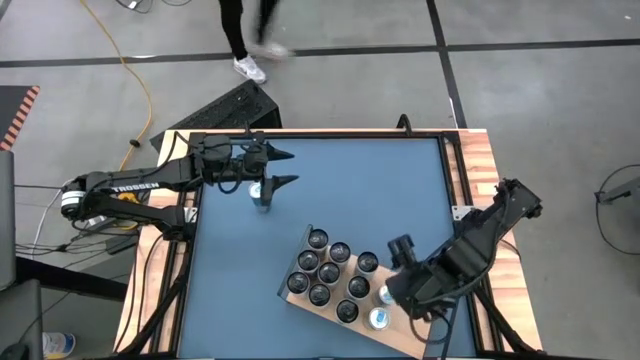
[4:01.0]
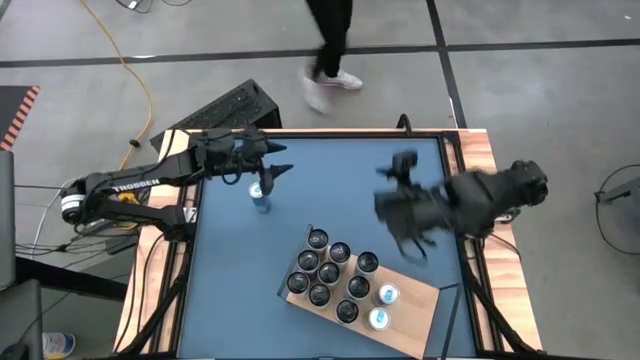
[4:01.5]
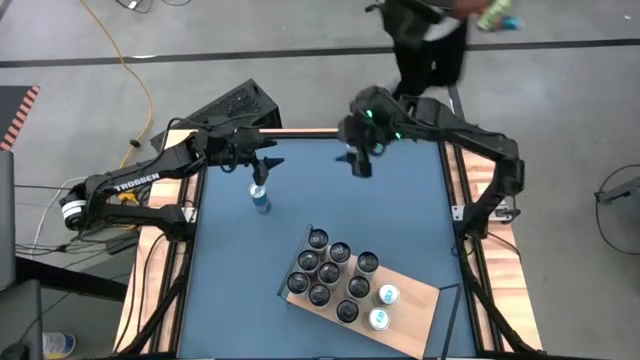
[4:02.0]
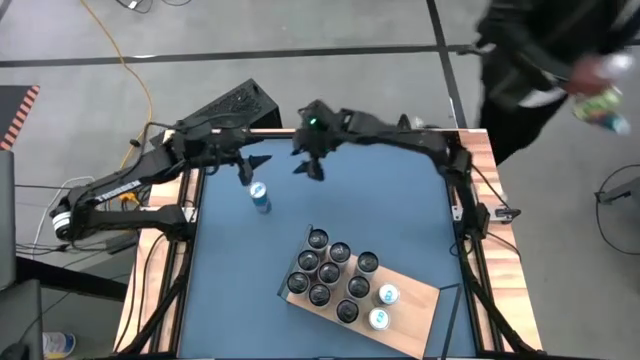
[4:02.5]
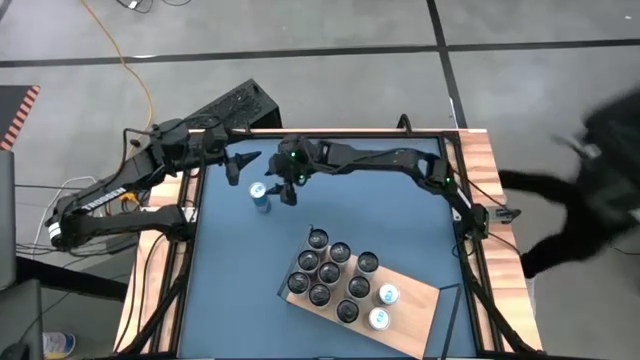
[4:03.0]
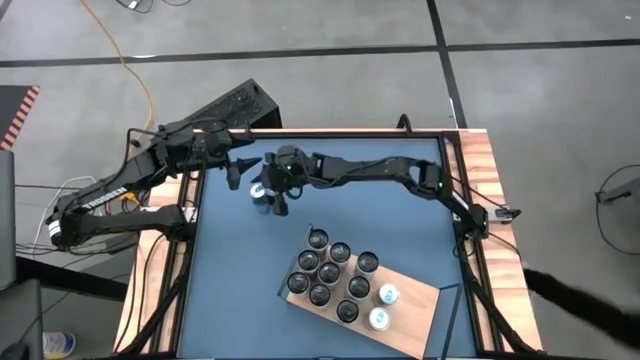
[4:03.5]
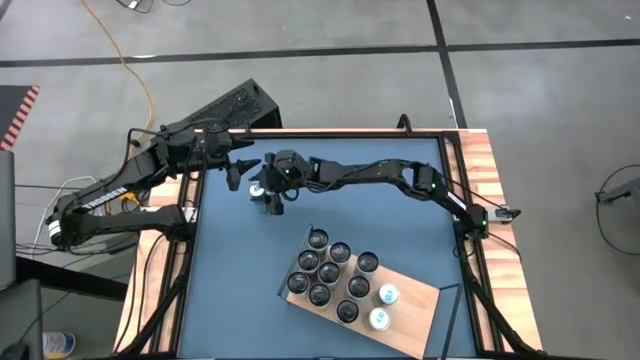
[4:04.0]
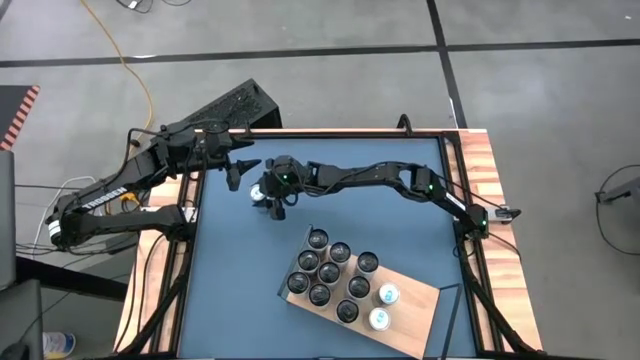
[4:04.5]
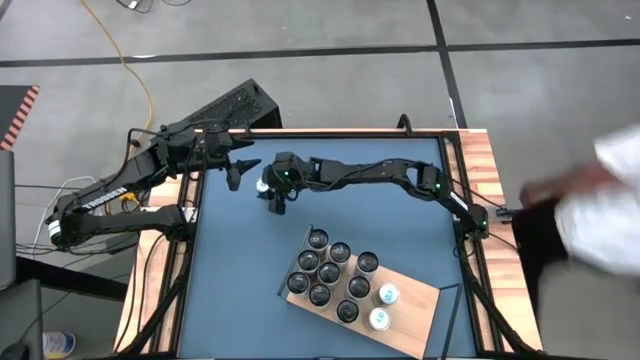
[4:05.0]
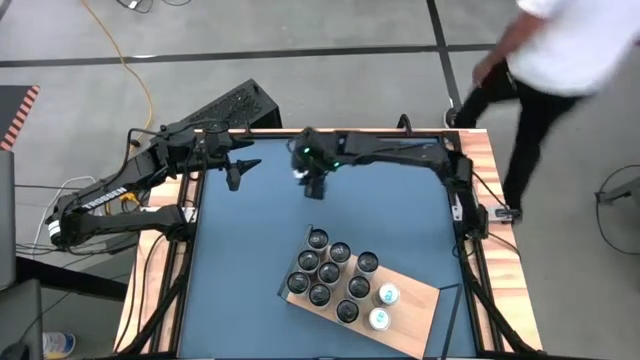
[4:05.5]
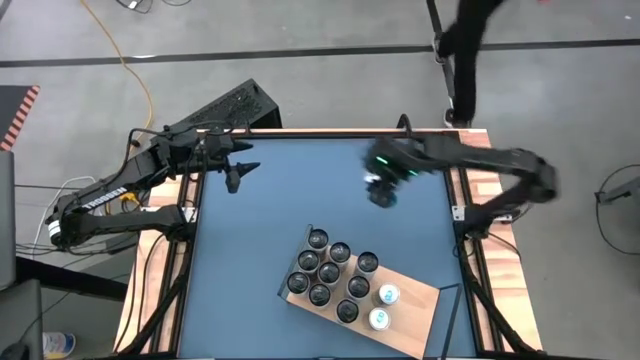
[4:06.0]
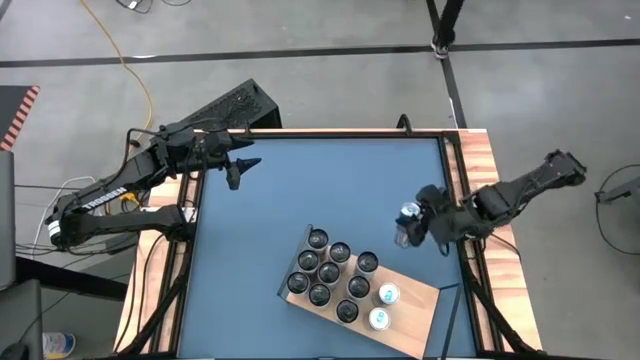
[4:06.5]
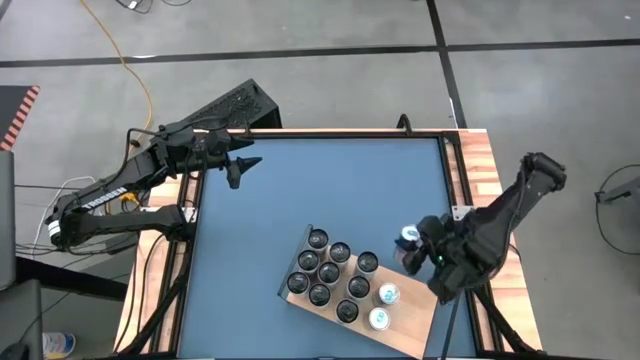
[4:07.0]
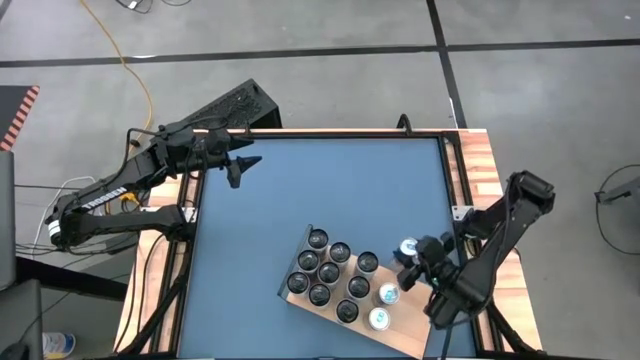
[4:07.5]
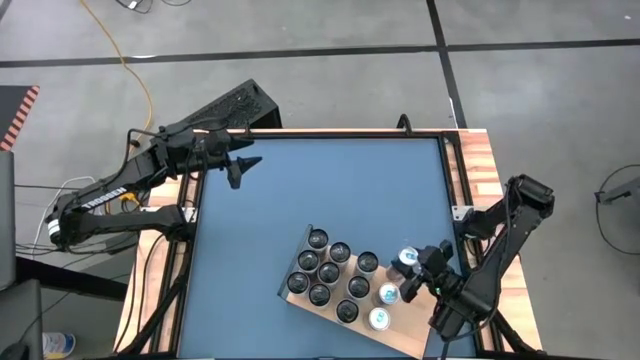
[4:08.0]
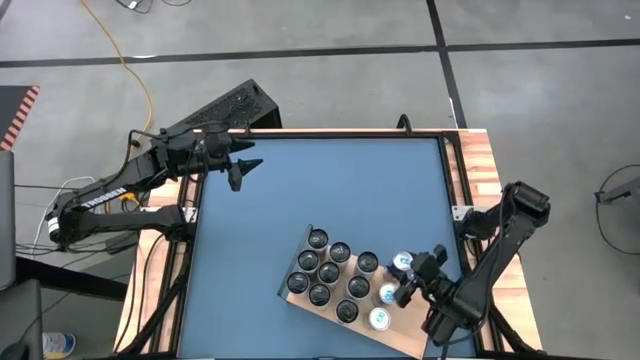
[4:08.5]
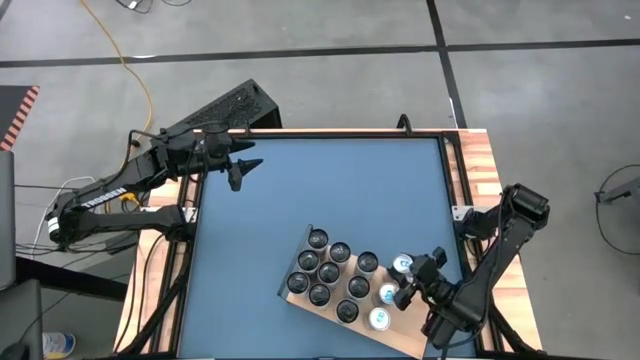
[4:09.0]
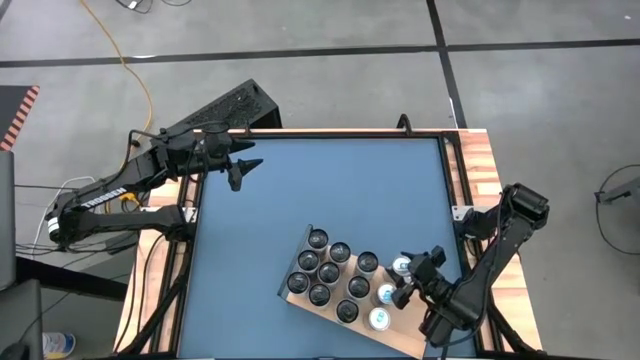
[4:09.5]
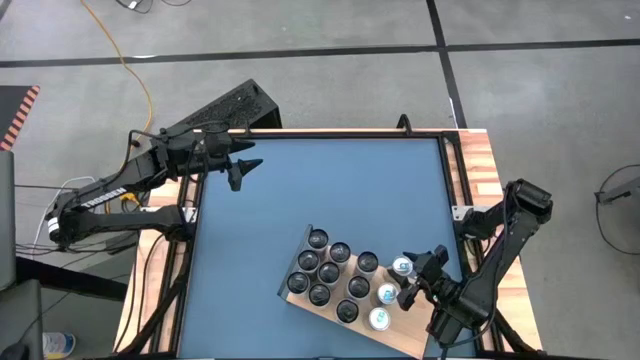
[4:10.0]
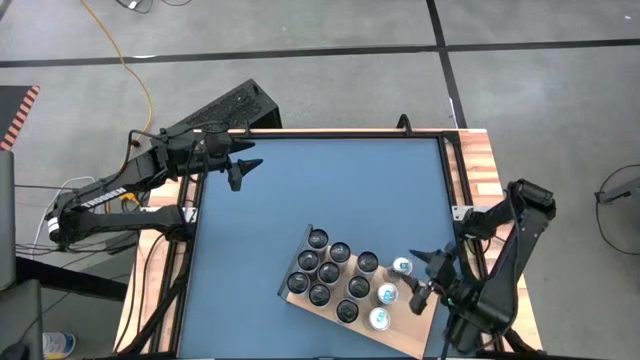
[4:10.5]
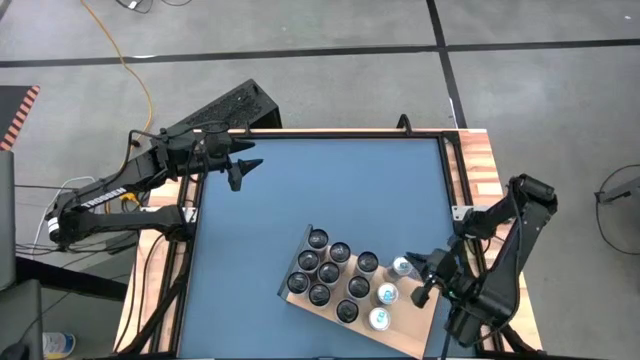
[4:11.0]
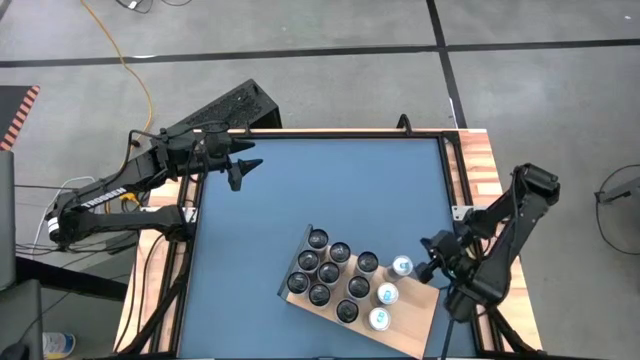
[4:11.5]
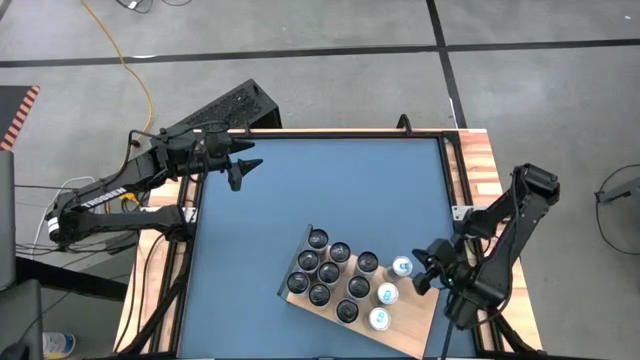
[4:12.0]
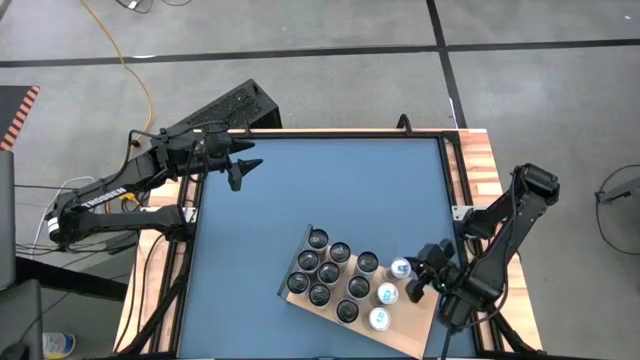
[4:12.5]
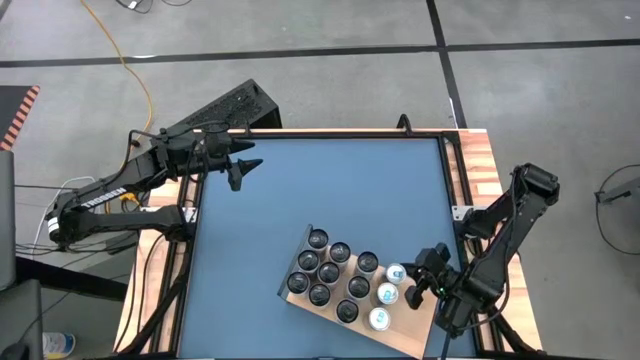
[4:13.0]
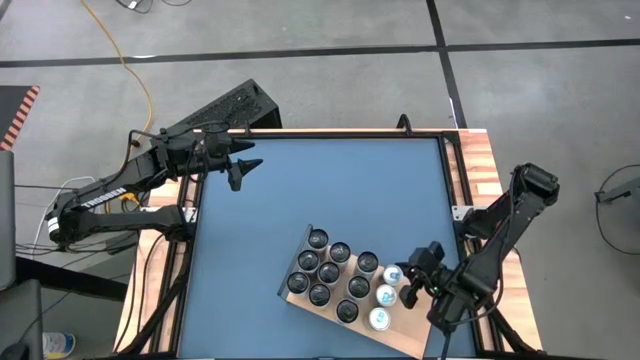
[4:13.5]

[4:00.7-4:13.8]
Task: Place canned beverage on shelf
Put the right blue soda can aligned with the other blue soda can on the shelf

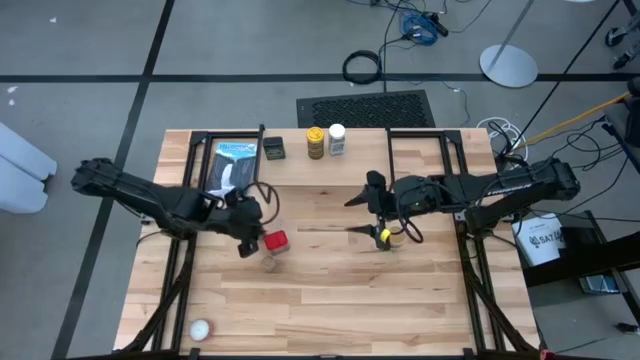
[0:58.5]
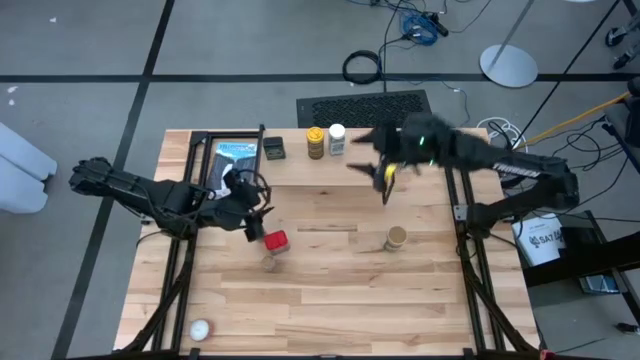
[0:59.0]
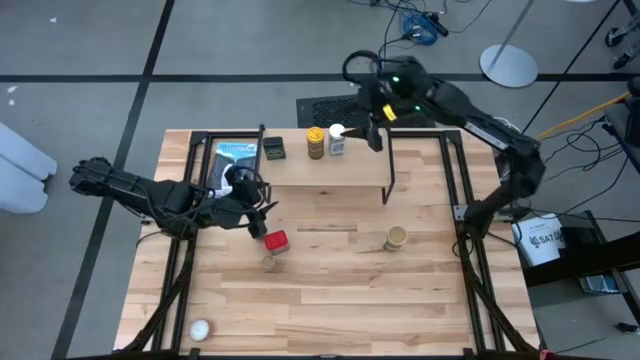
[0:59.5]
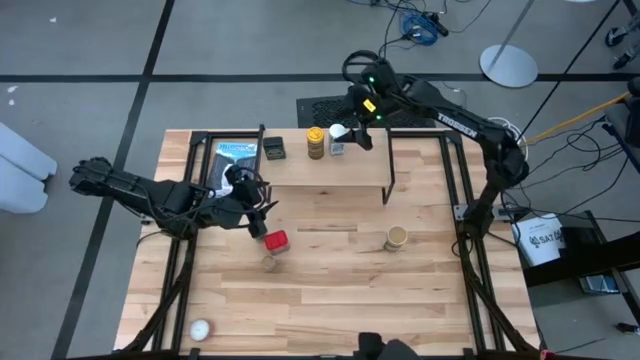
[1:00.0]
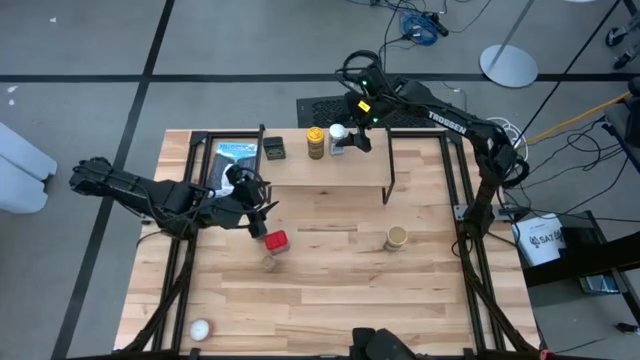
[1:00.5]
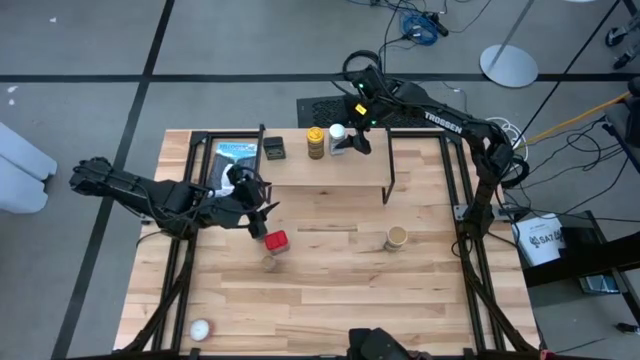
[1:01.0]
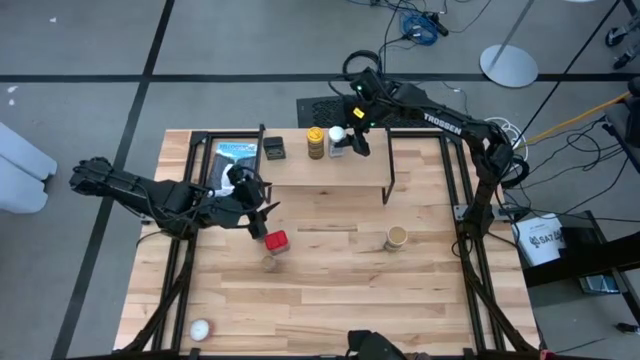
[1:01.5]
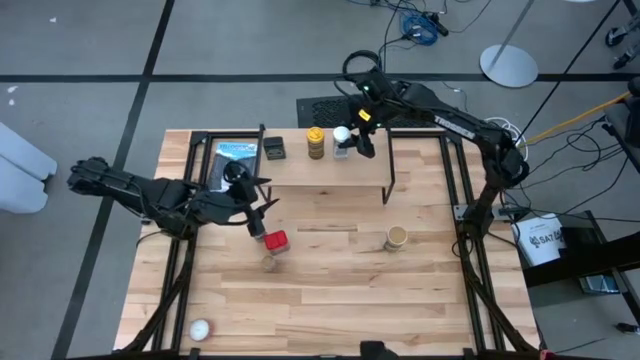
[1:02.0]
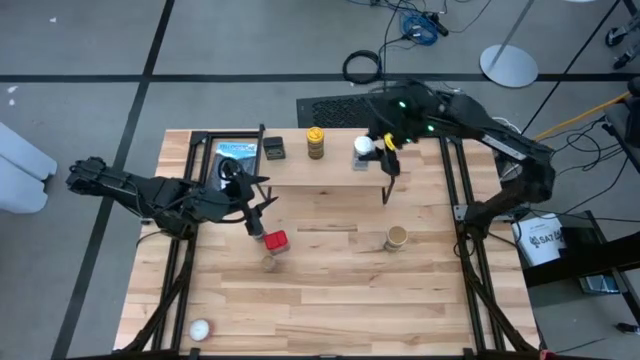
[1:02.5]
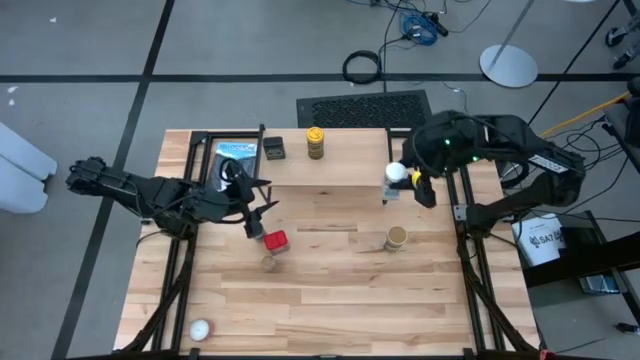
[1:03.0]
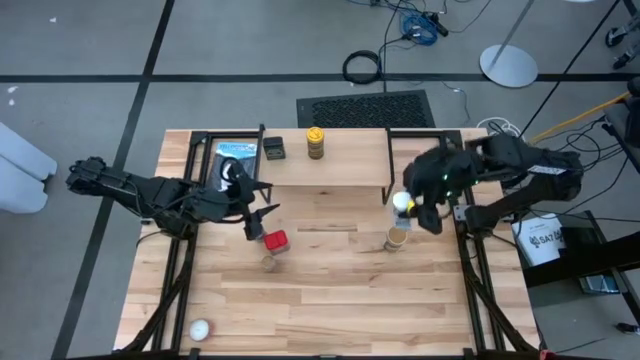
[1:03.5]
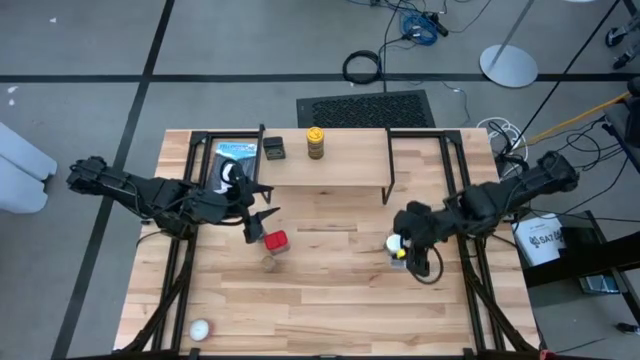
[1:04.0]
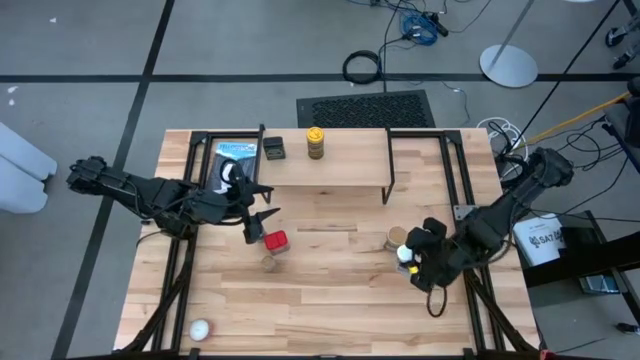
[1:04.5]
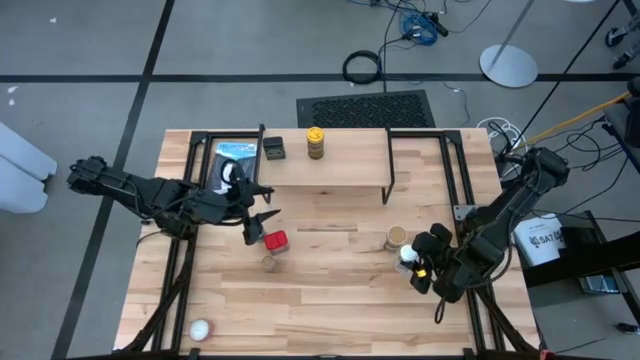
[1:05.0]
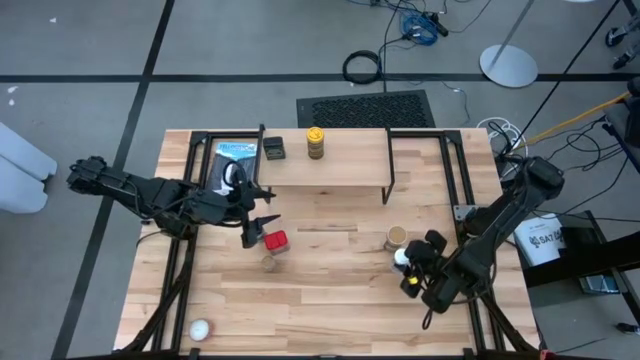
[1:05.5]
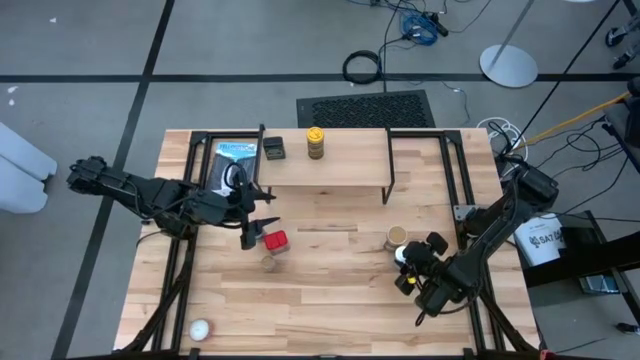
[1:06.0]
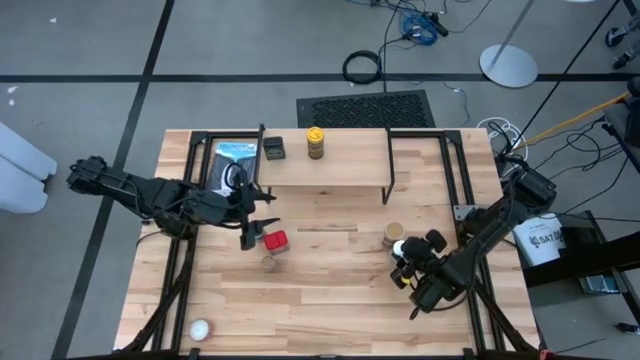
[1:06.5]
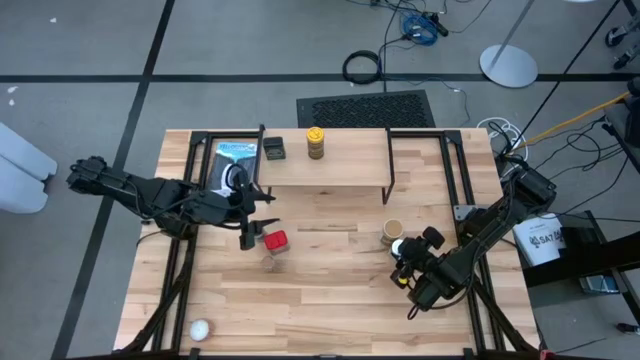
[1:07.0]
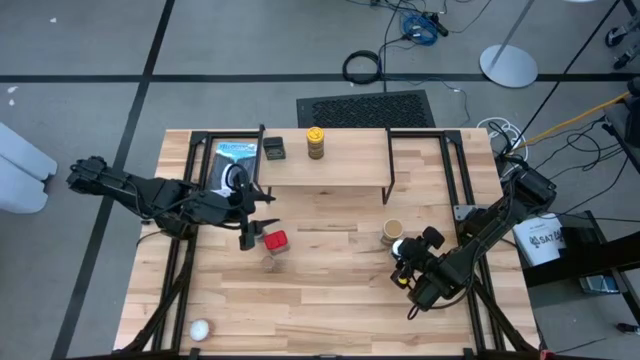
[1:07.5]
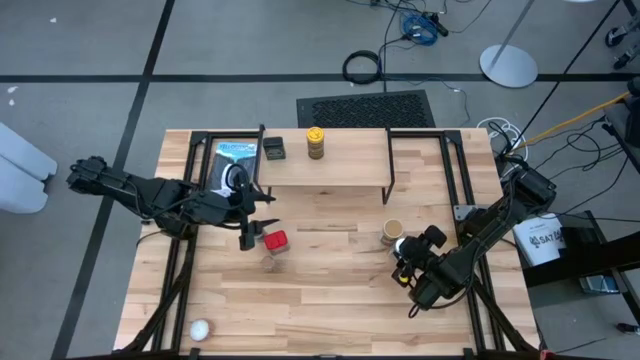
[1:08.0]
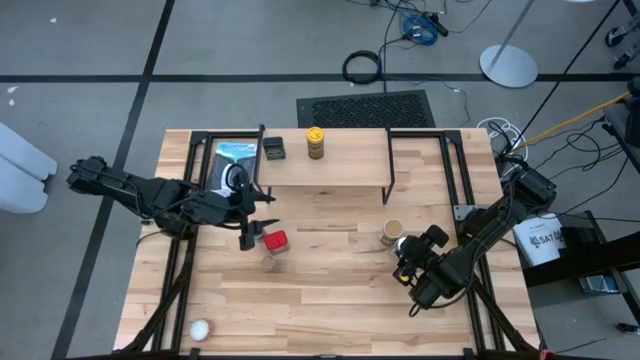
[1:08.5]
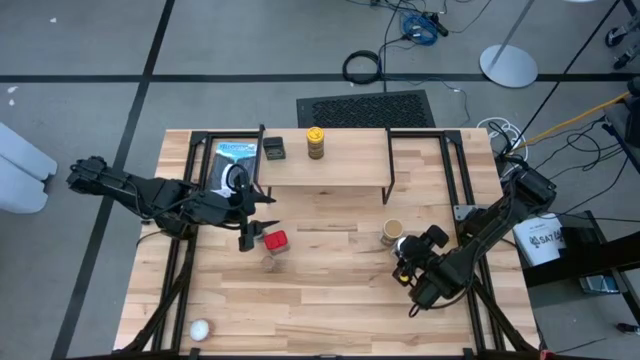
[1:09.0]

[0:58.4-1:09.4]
Task: Shelf spices
Remove the white seasoning bottle from the shelf
